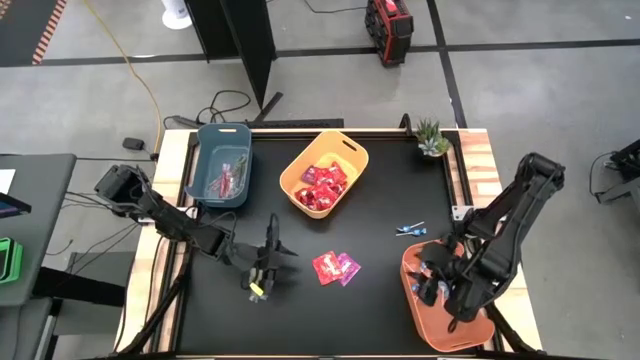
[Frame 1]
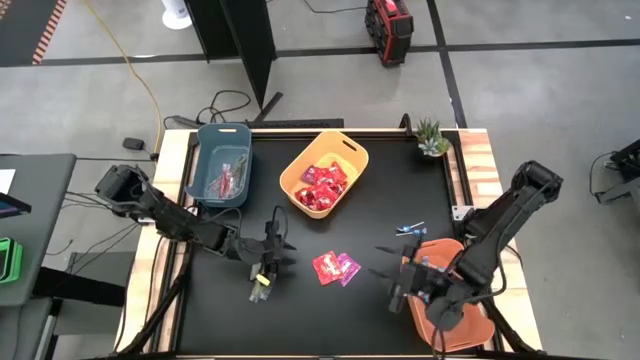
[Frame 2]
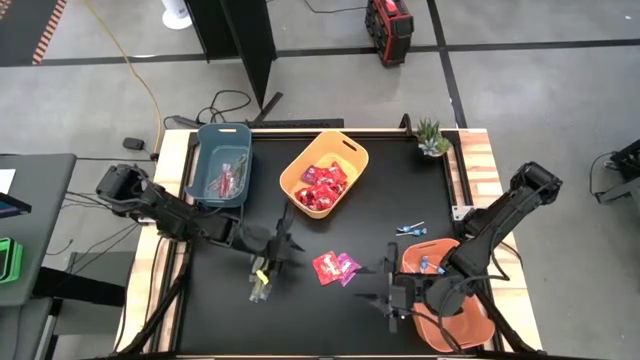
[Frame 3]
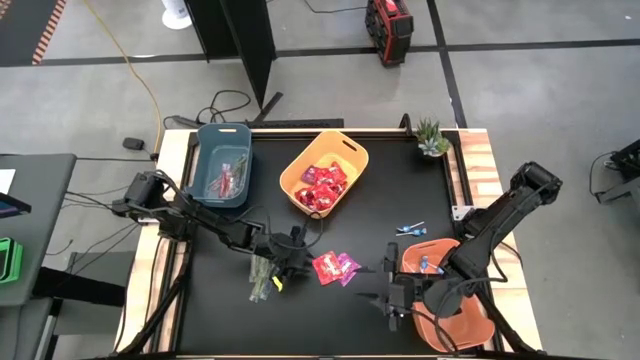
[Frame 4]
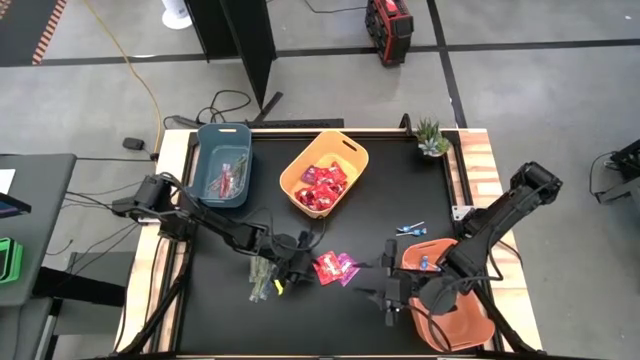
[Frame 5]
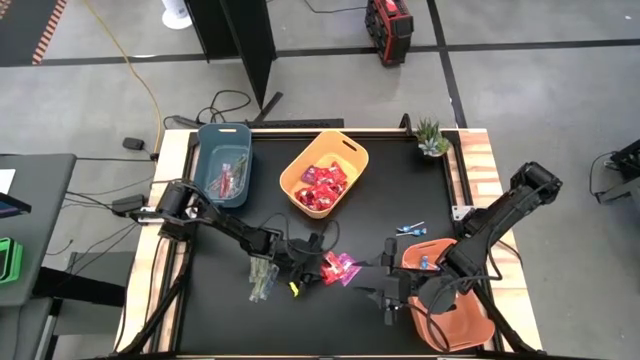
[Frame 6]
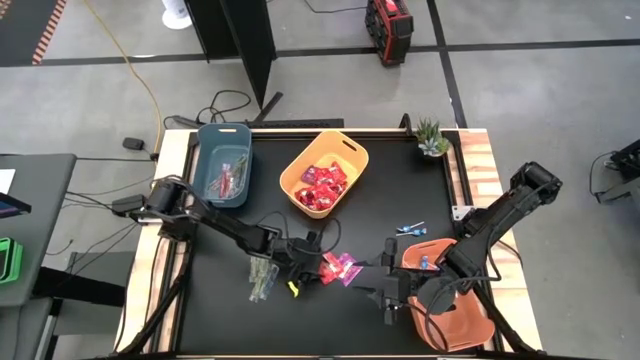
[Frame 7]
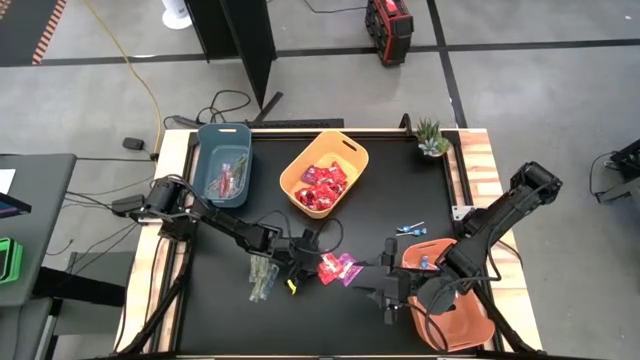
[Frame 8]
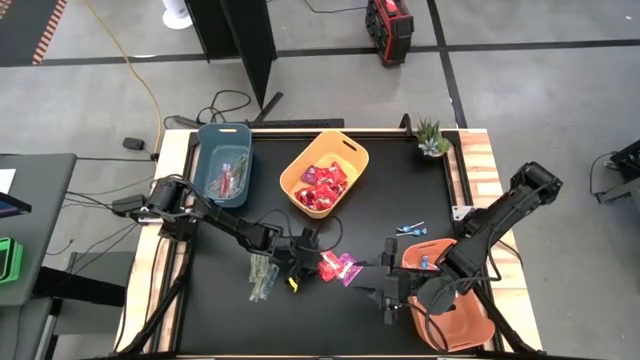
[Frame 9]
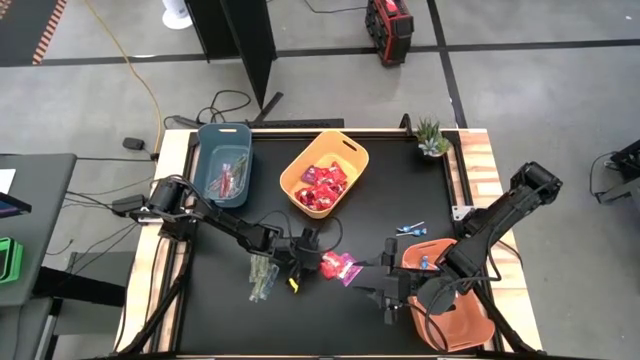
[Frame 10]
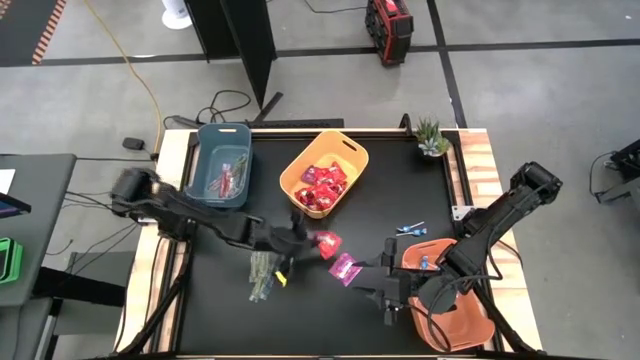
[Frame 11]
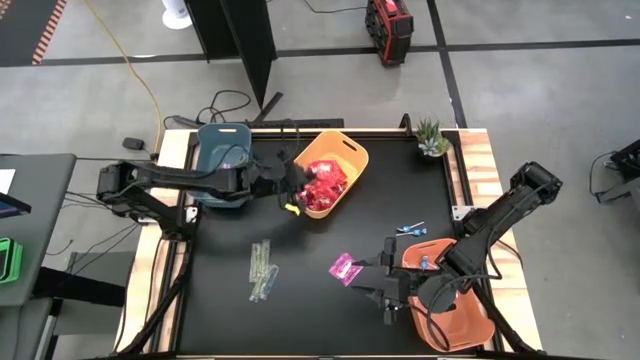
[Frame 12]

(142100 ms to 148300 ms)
Task: Sort candy
Put the red candy into the yellow bin

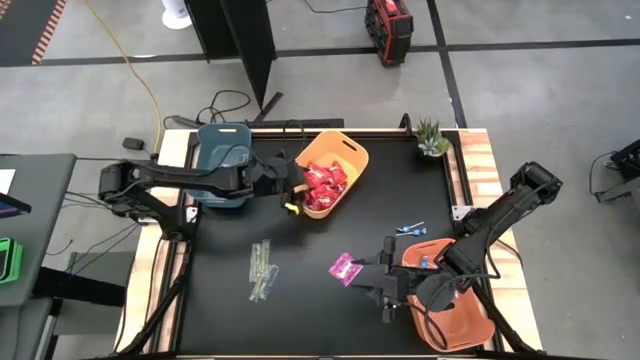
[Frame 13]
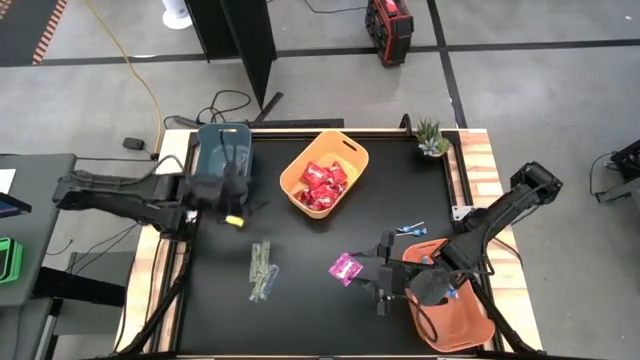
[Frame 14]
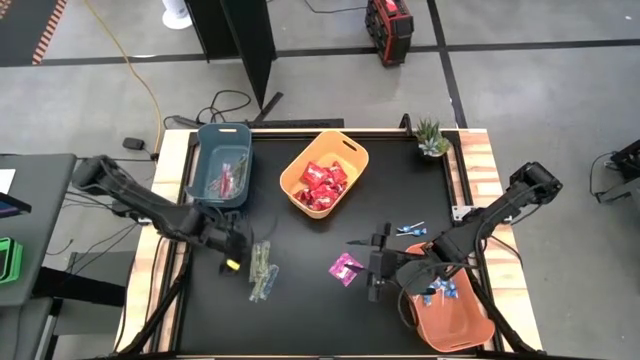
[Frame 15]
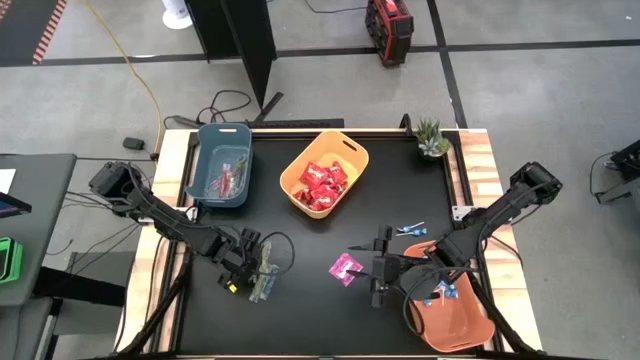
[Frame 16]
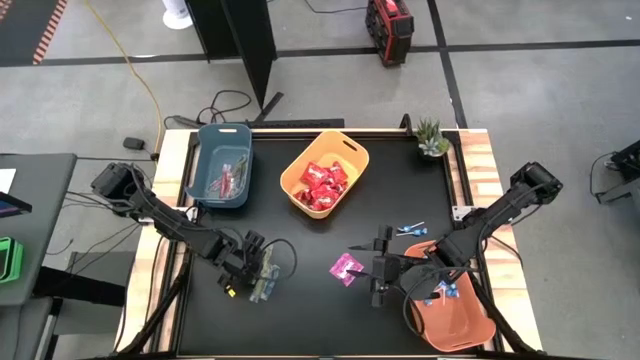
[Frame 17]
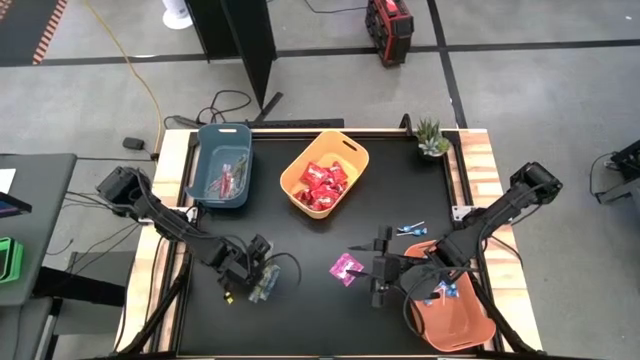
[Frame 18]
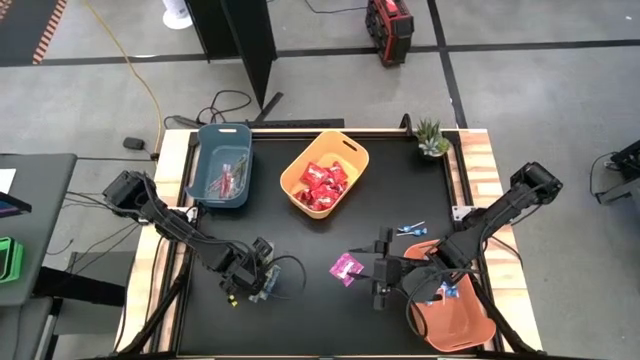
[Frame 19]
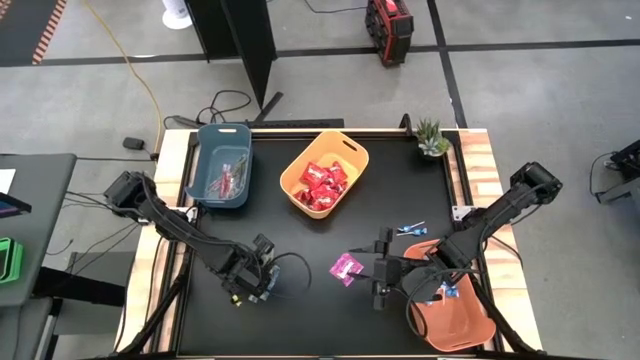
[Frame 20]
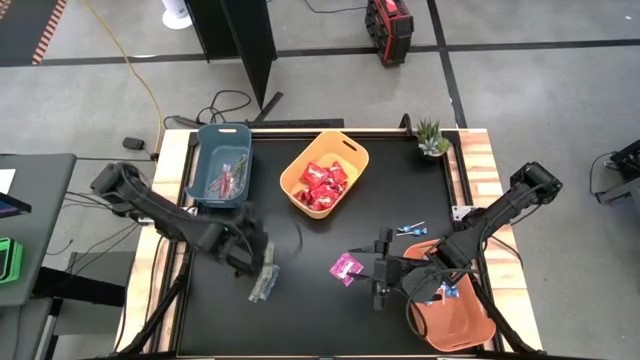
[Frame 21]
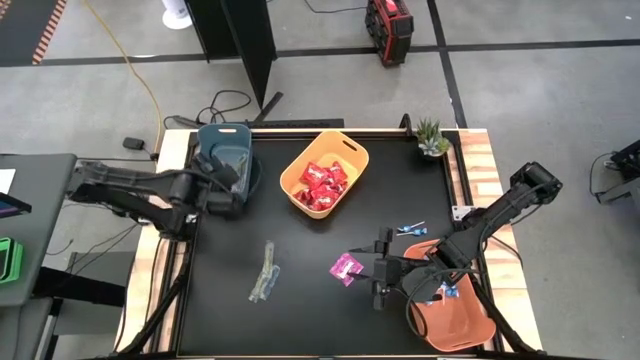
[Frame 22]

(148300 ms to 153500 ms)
Put the green gummy into the blue bin

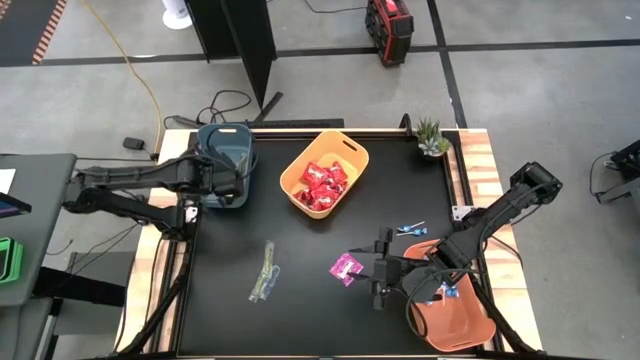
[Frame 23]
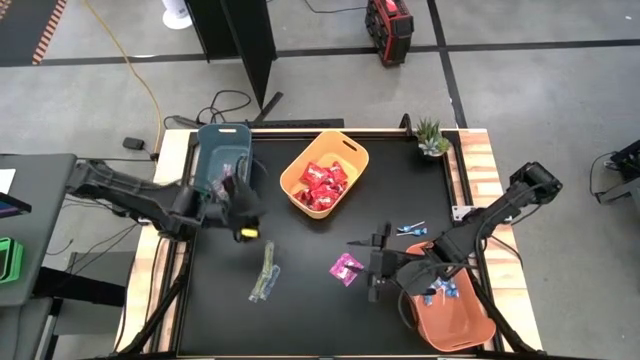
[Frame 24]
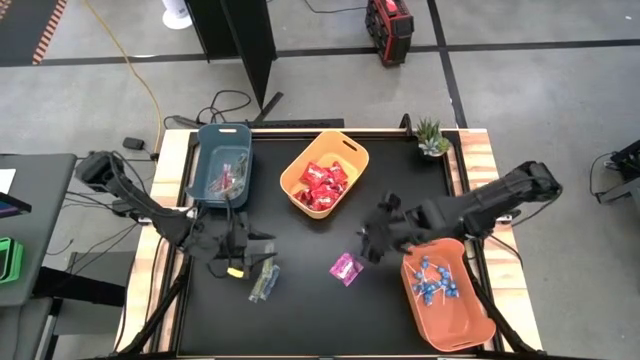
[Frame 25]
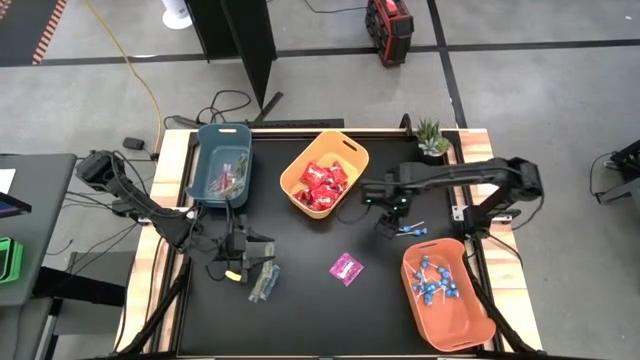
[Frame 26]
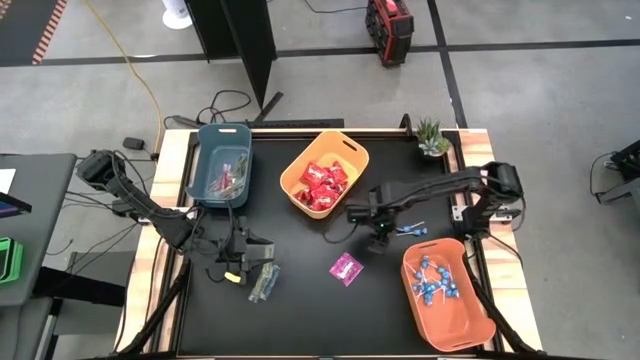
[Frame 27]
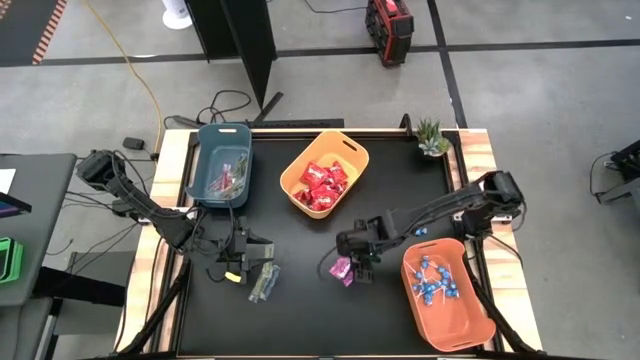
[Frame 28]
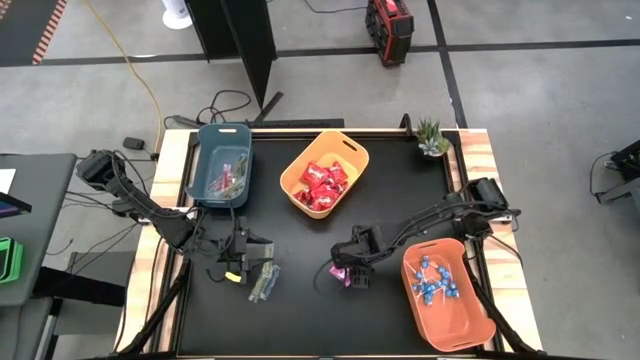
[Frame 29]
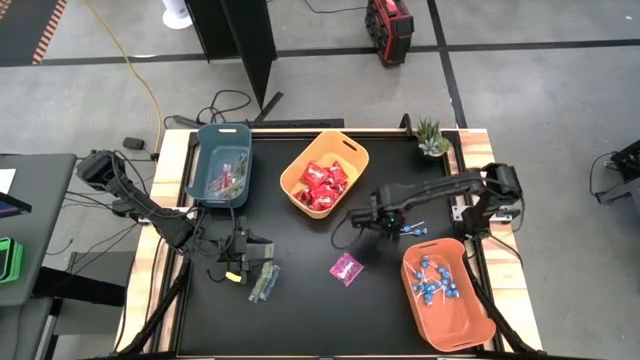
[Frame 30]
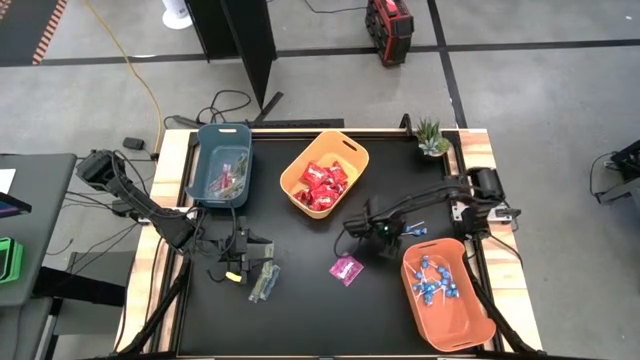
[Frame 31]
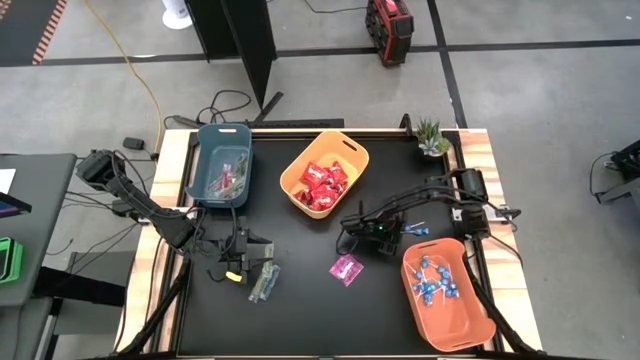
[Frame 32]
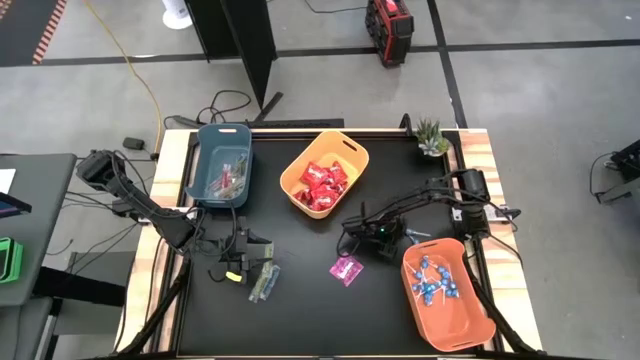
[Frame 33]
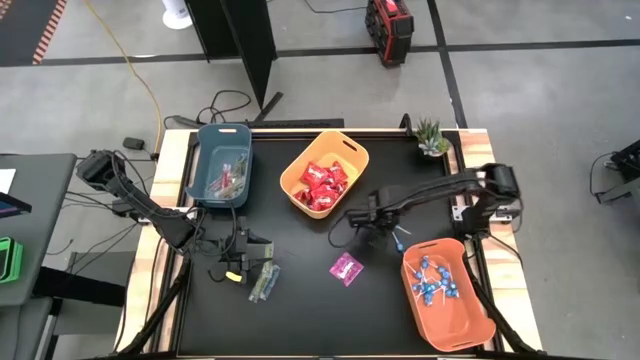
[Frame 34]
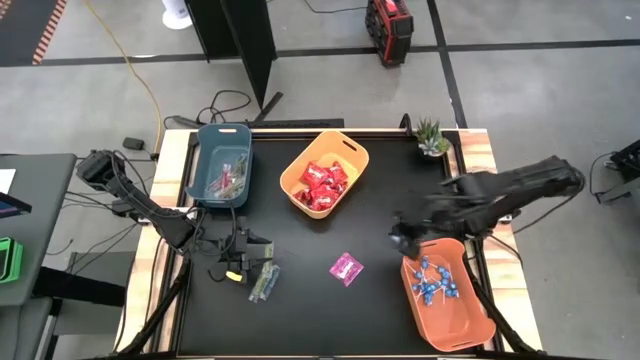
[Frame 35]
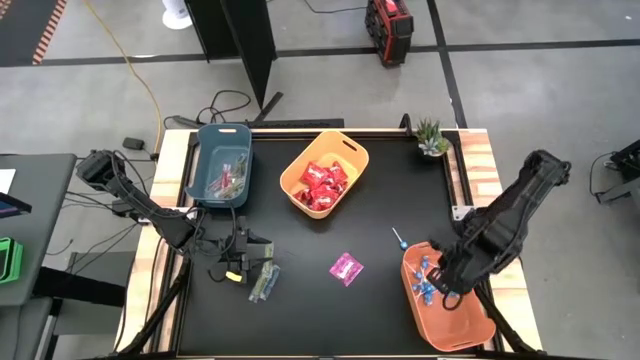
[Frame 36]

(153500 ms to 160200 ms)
Put the blue lollipop into the orange bin

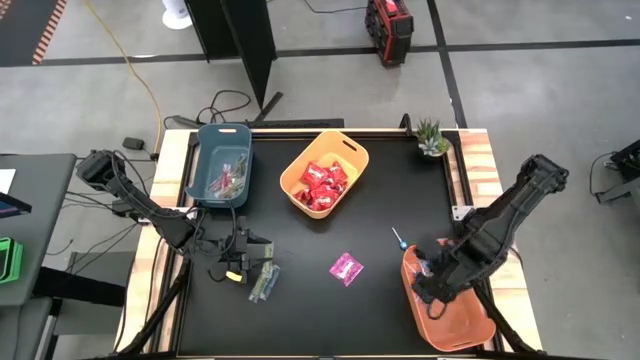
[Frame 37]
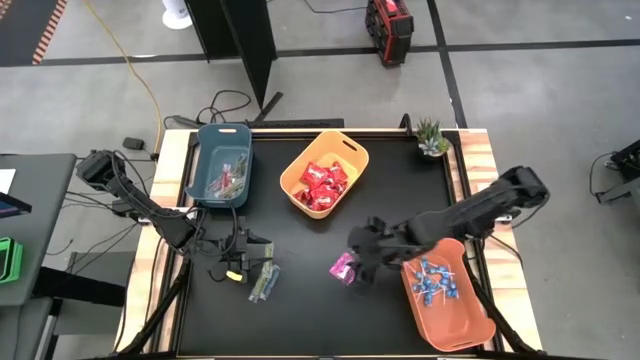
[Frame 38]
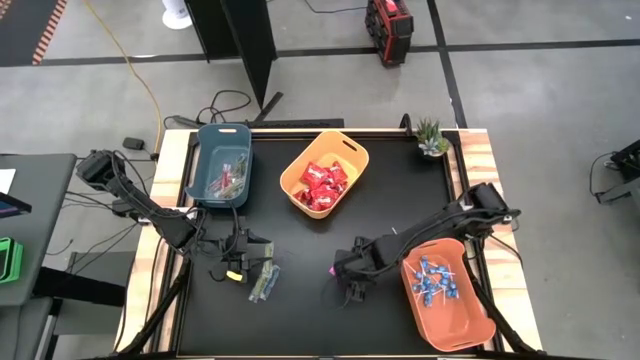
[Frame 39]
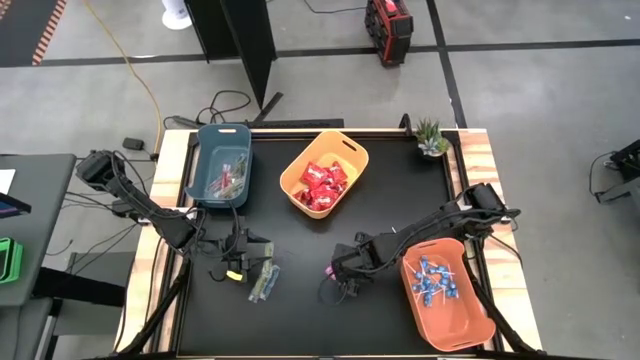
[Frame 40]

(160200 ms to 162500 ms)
Put the purple gummy into the blue bin

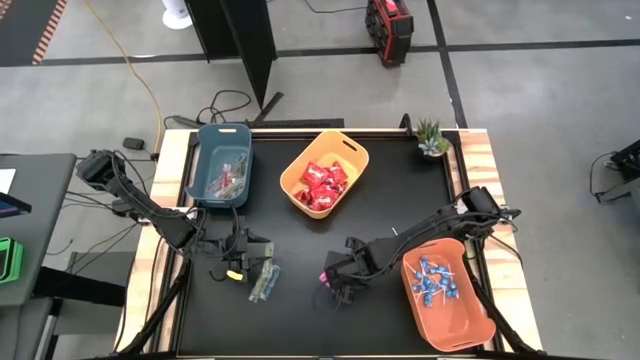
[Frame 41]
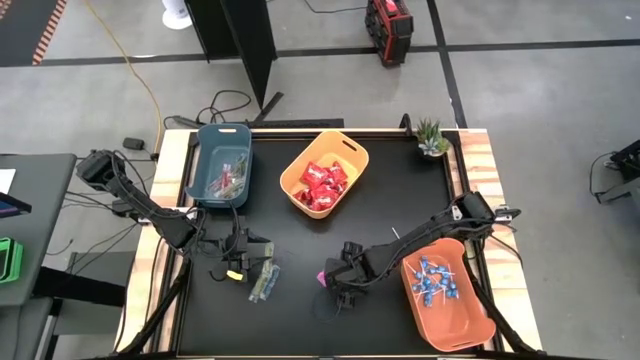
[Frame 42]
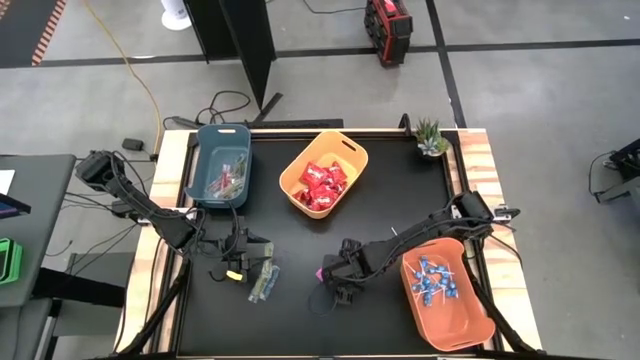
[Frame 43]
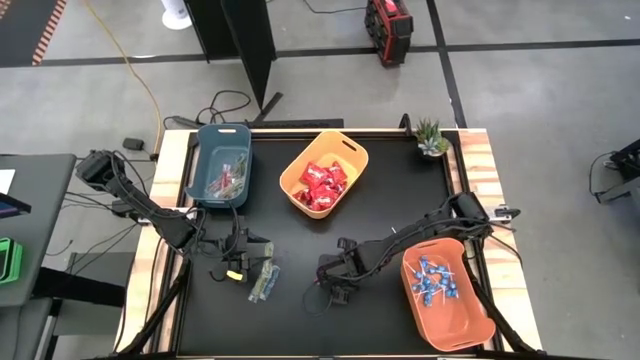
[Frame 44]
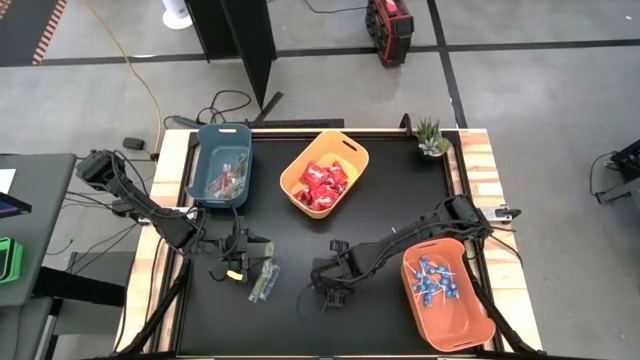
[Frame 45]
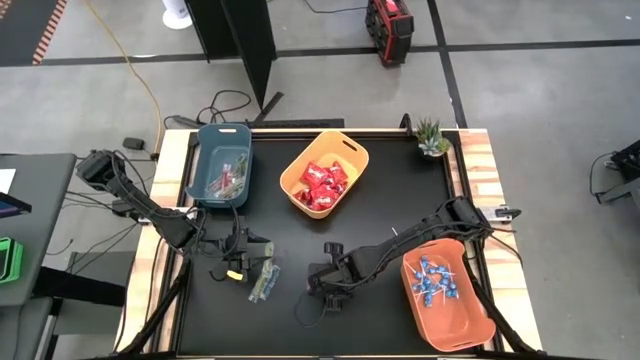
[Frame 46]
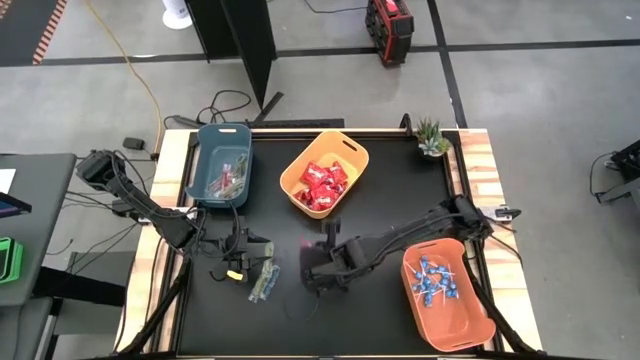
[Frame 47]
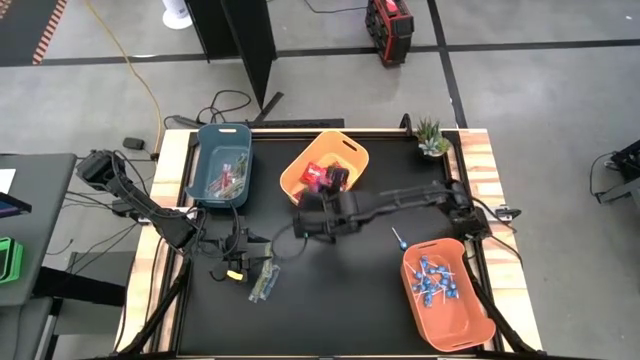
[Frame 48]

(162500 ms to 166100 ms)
Put the purple gummy into the blue bin
